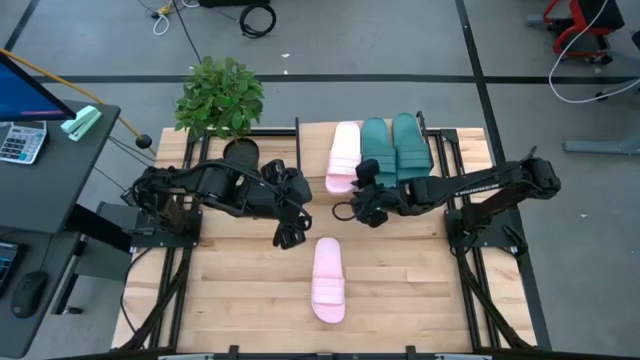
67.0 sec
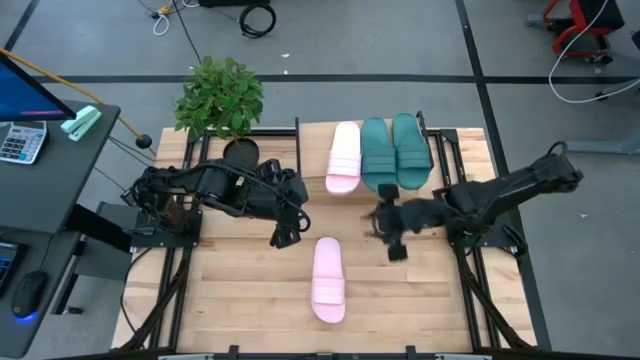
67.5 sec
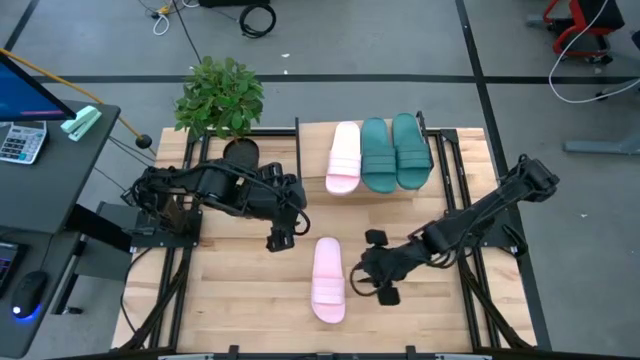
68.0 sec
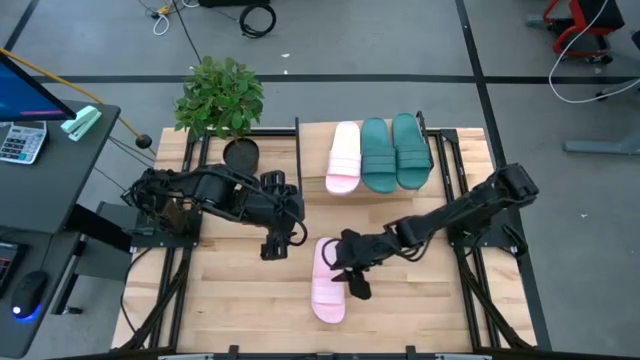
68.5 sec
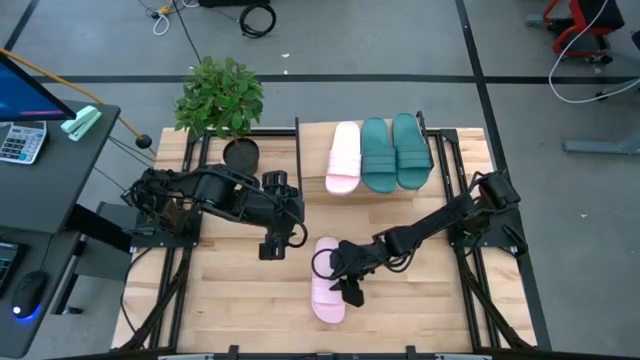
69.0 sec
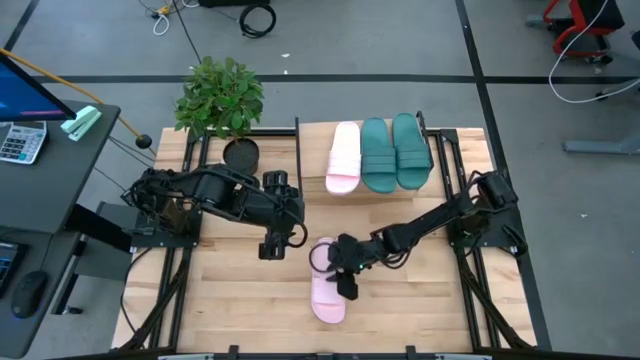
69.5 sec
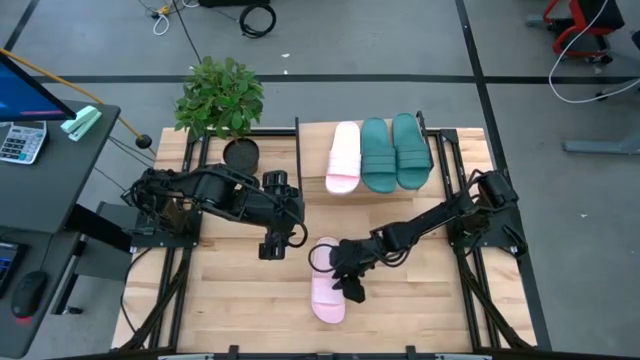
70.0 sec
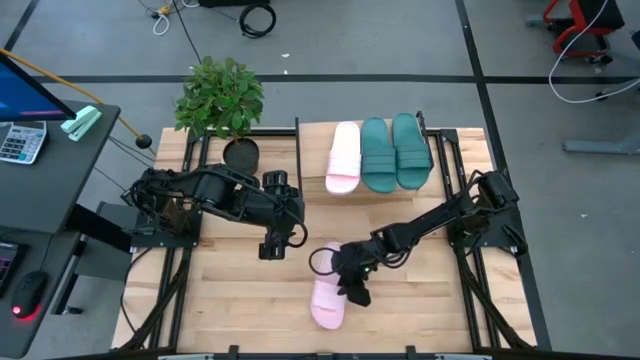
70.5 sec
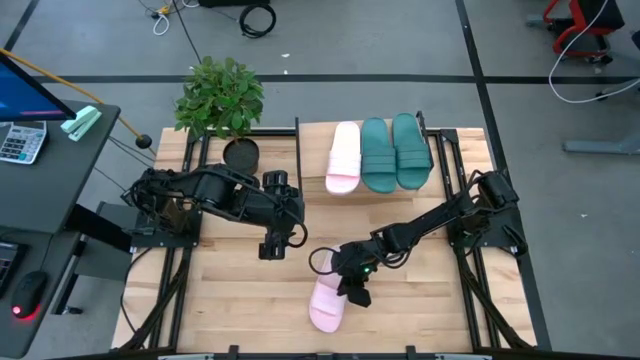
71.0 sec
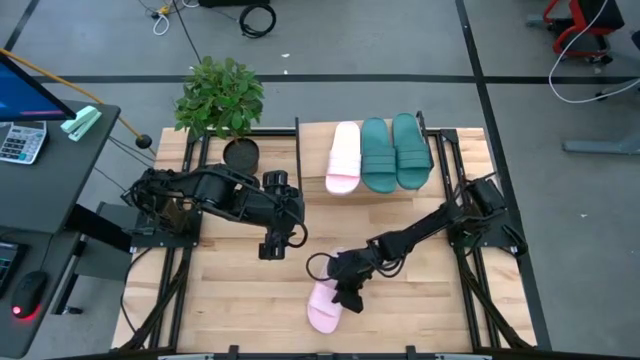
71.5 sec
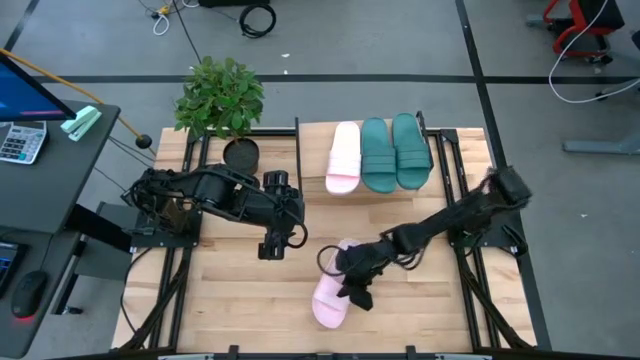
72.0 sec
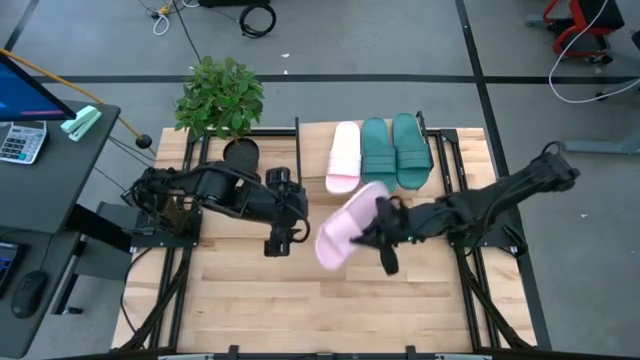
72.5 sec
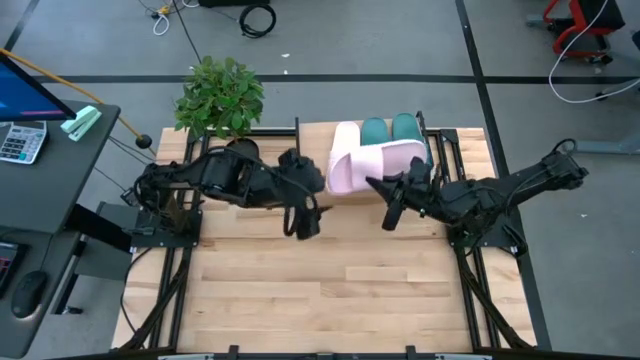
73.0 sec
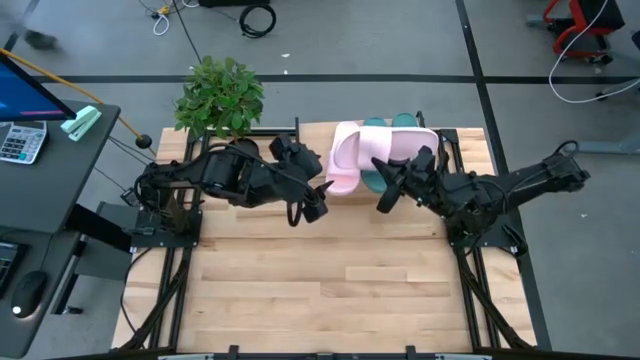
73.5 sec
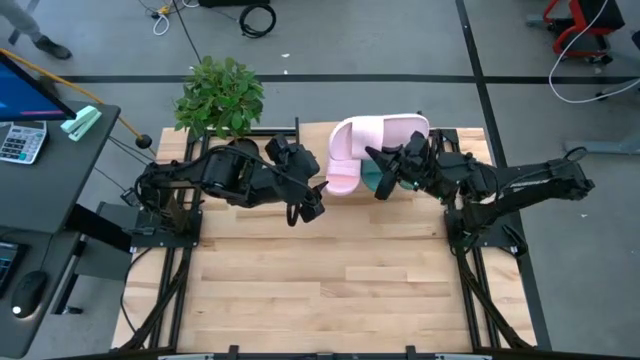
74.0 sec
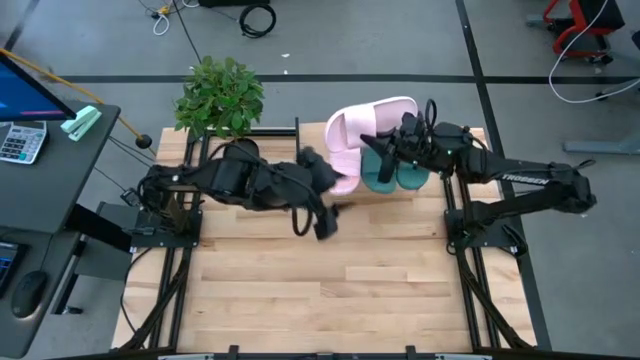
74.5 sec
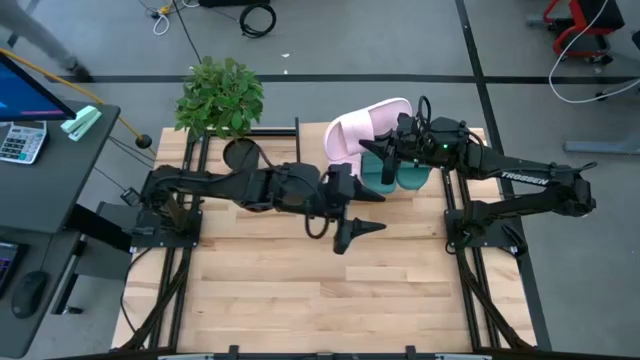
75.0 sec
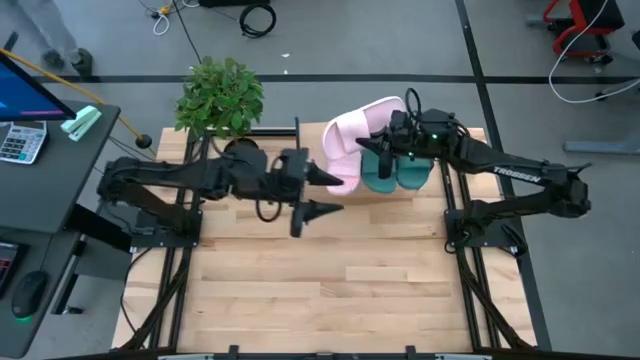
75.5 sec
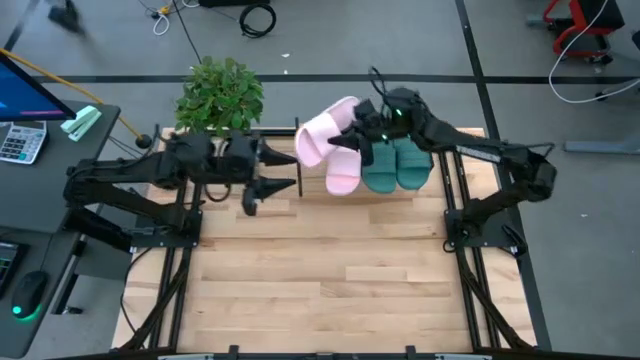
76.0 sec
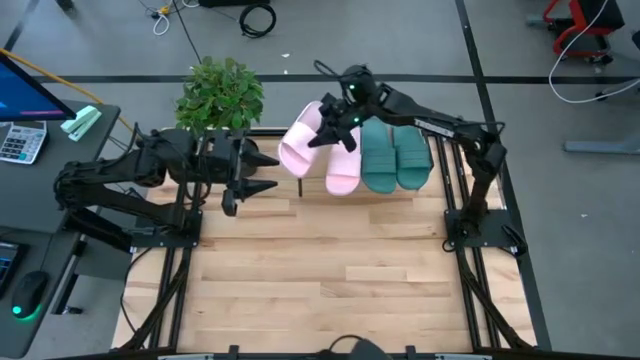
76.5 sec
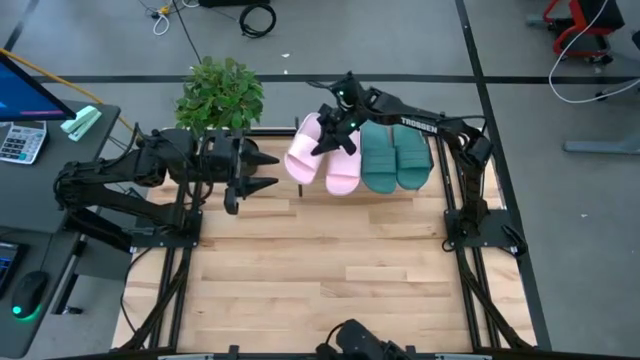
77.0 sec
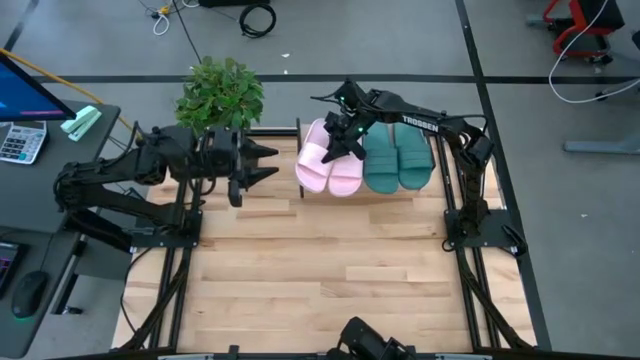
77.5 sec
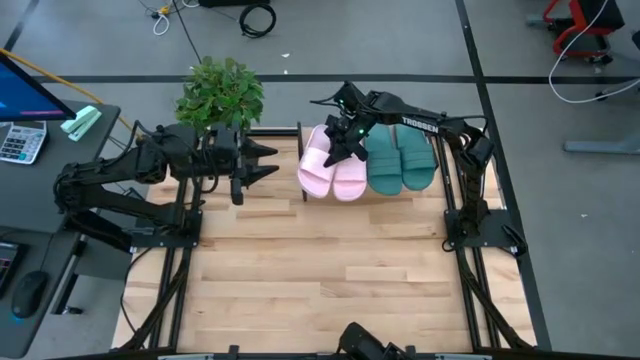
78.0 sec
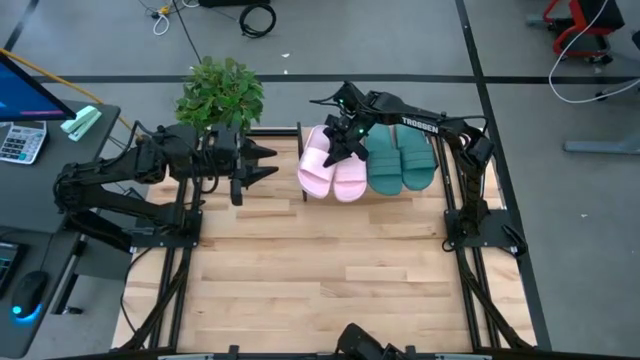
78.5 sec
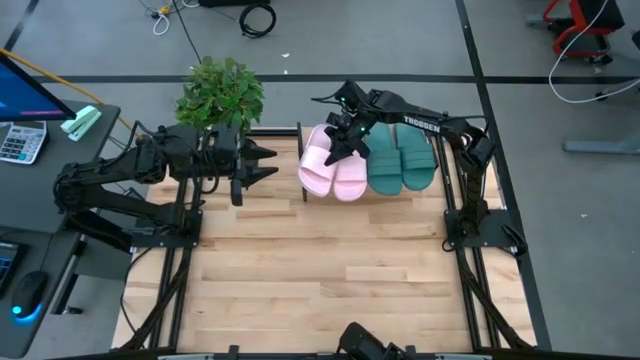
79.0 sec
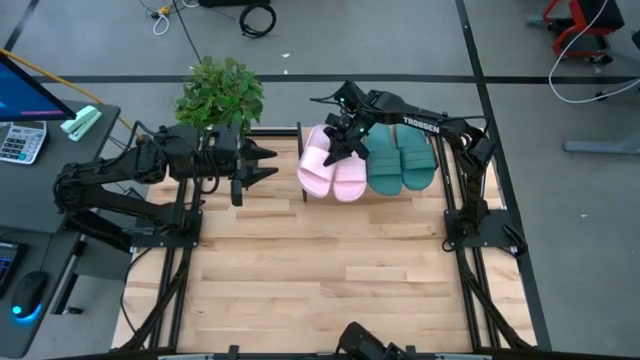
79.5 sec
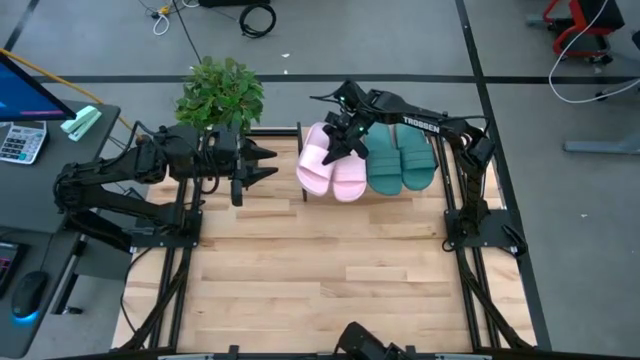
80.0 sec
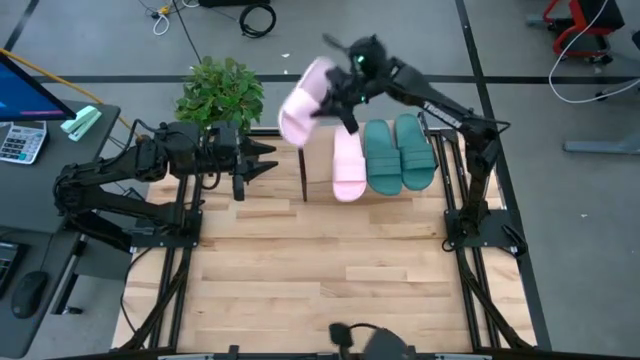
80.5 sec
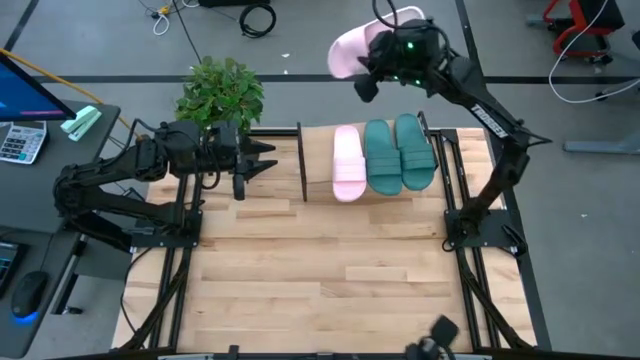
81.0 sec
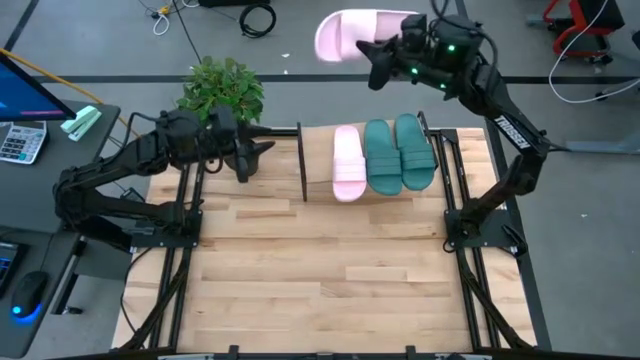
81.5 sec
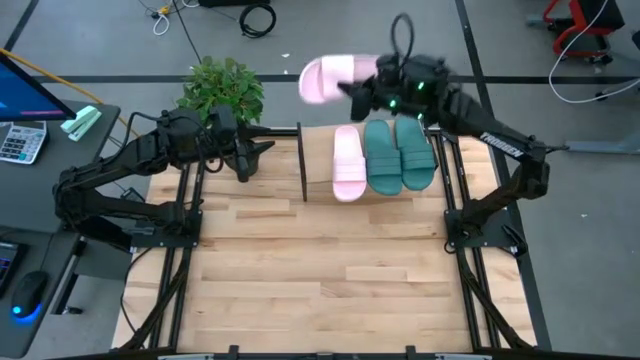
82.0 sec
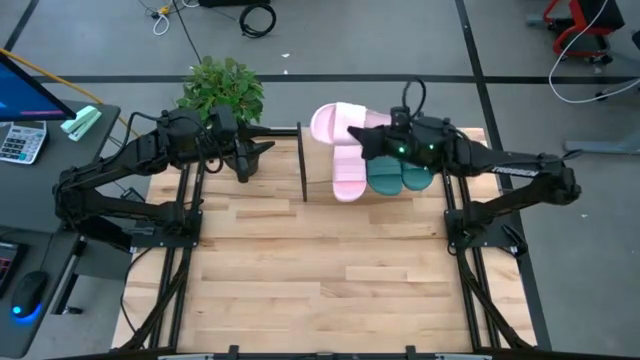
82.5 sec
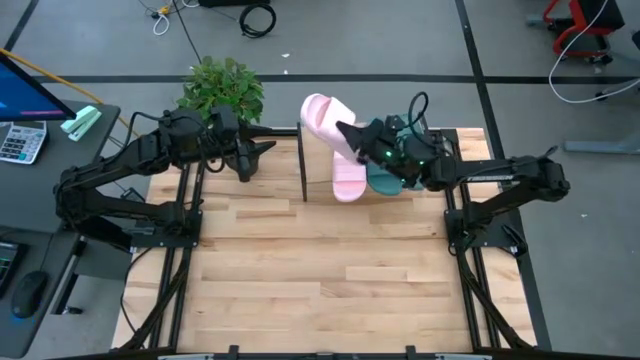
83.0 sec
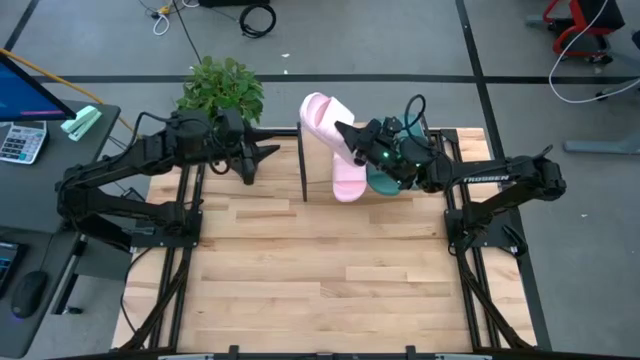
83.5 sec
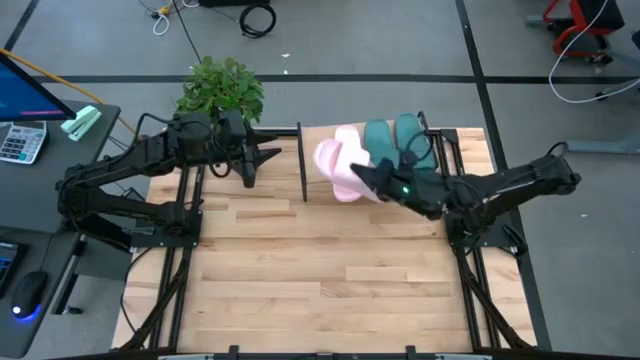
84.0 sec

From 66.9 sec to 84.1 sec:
Task: Pick and place slides into the shelf
Put the pink slipper on the shelf

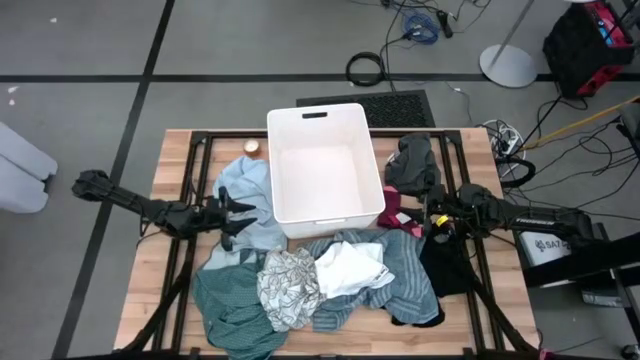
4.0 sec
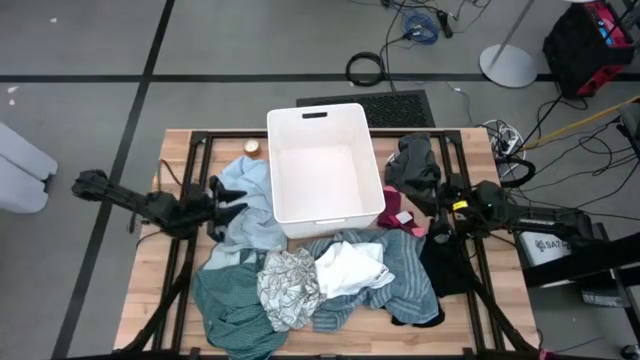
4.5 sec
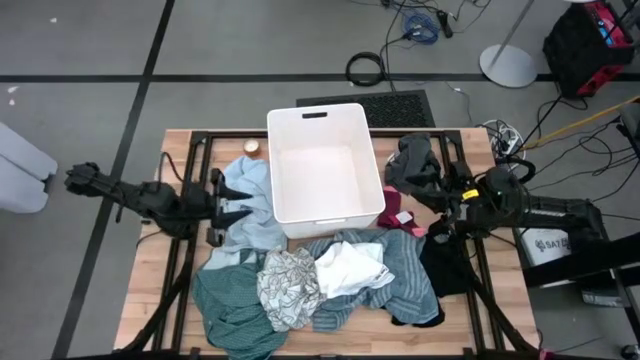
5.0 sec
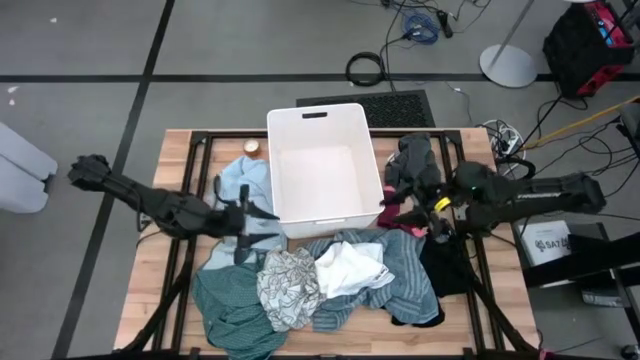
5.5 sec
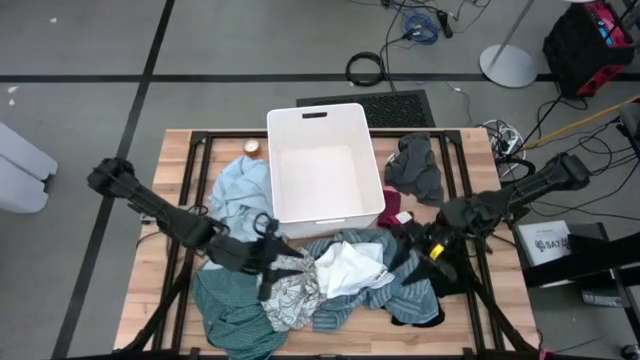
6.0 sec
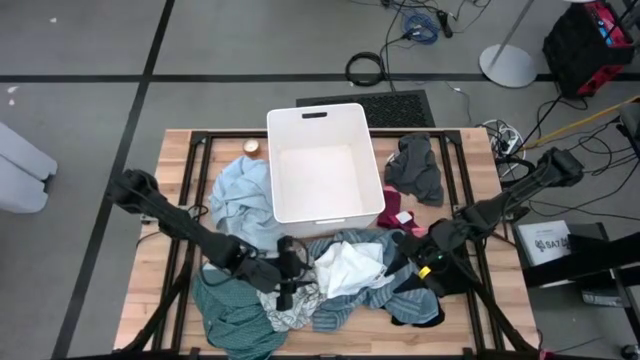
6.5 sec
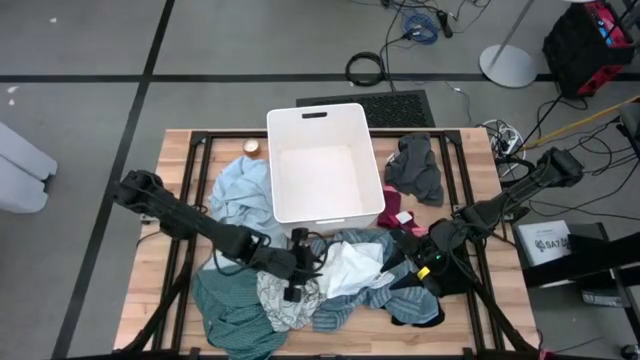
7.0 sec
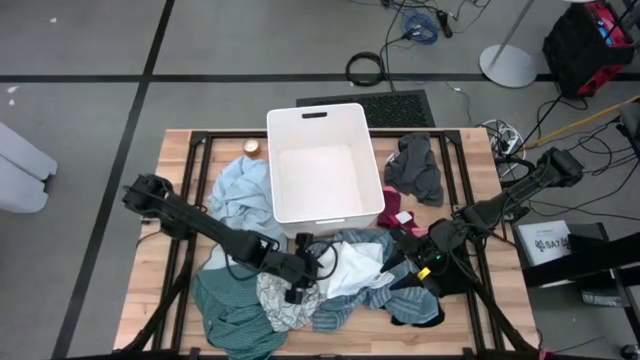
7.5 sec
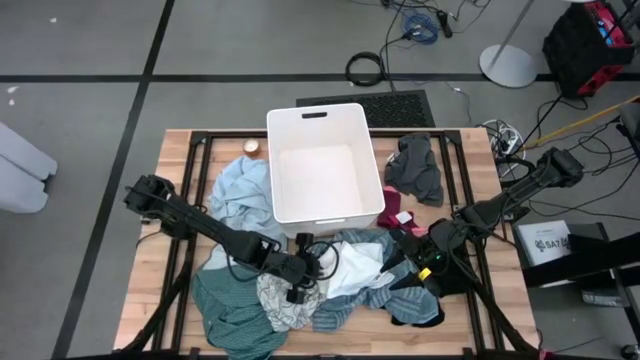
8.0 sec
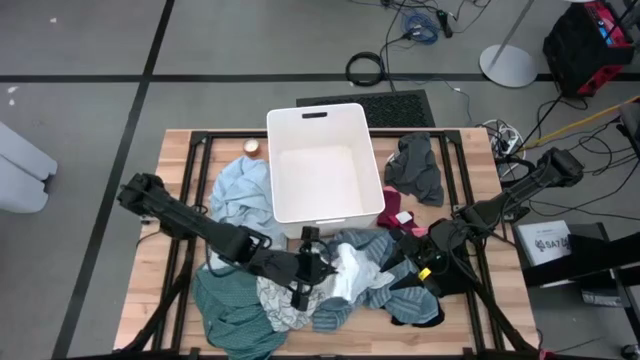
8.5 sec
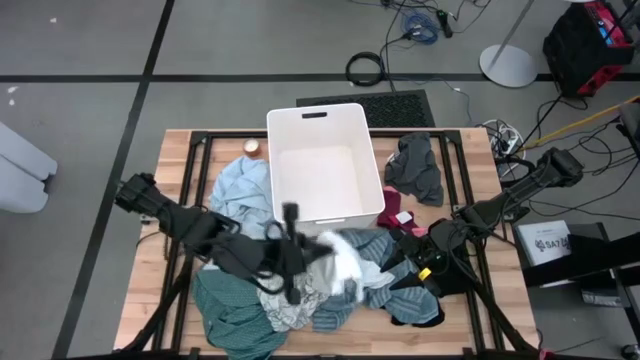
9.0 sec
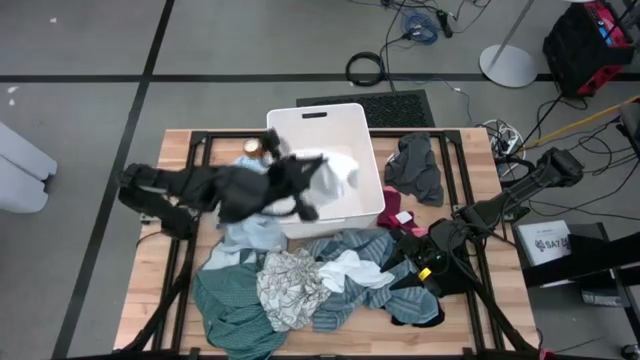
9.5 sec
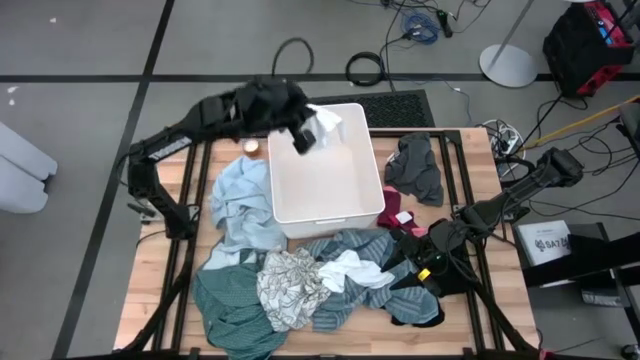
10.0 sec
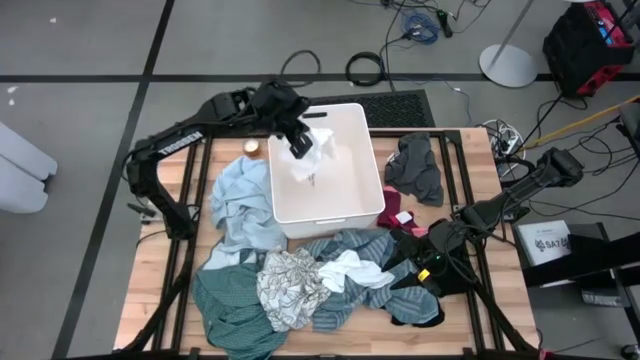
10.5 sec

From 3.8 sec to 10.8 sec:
Task: Sort clothes
Put the white cloth into the white laundry bin
